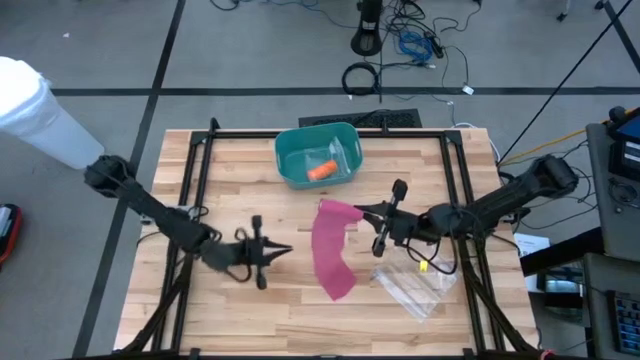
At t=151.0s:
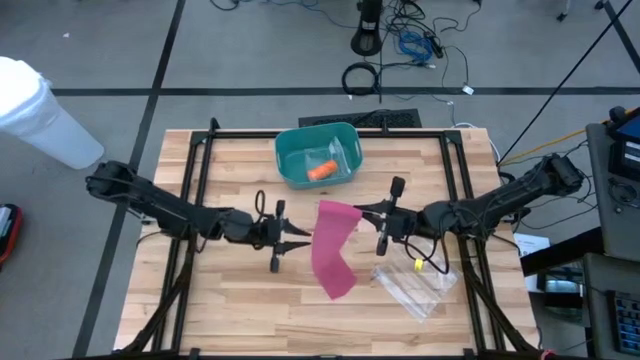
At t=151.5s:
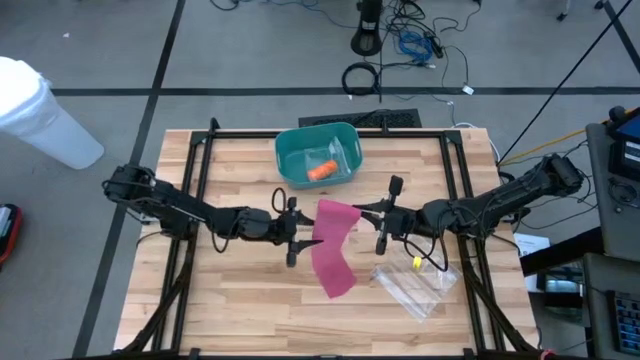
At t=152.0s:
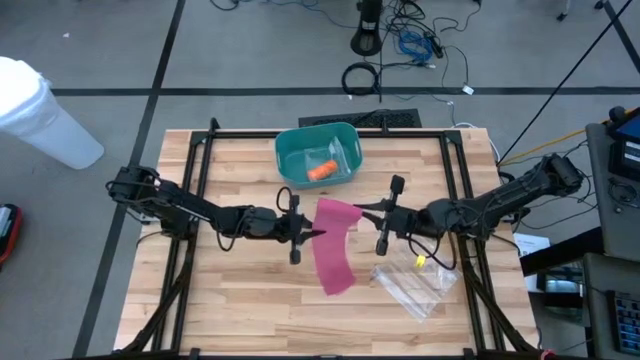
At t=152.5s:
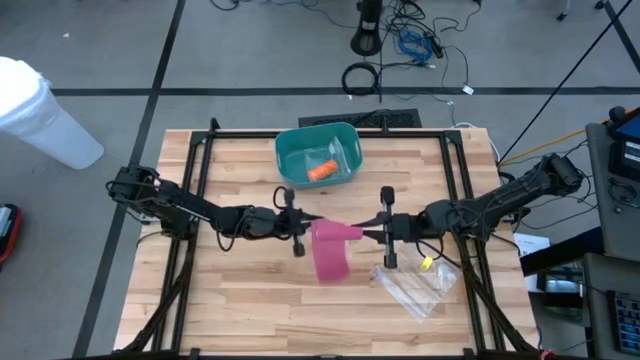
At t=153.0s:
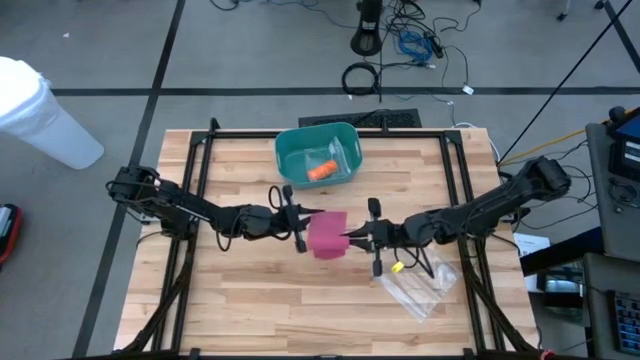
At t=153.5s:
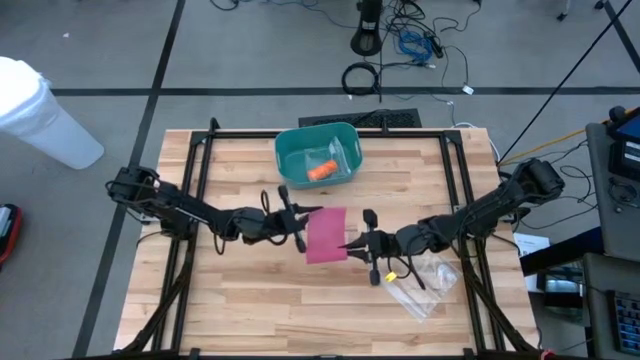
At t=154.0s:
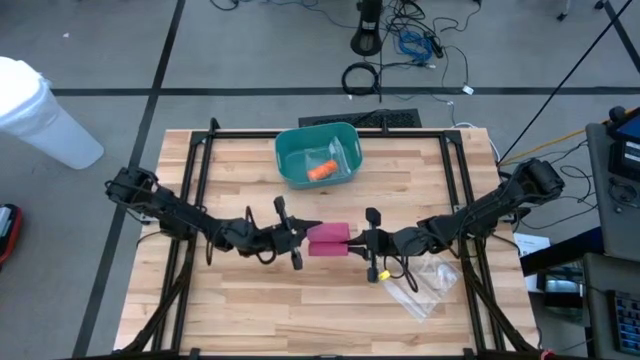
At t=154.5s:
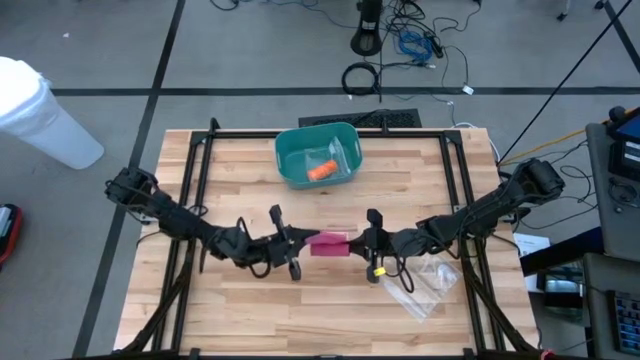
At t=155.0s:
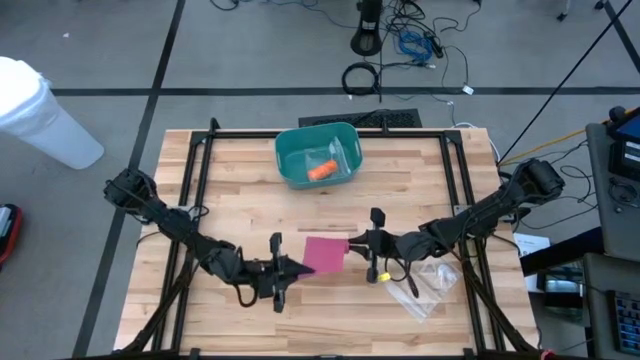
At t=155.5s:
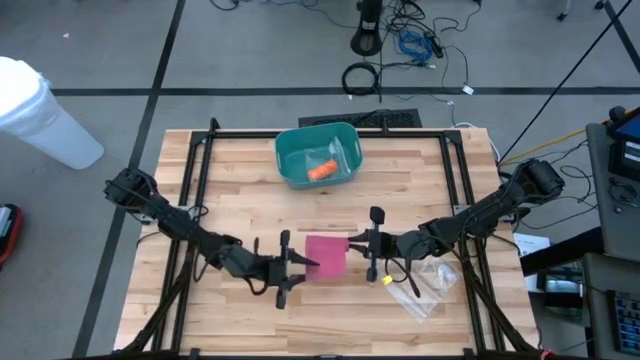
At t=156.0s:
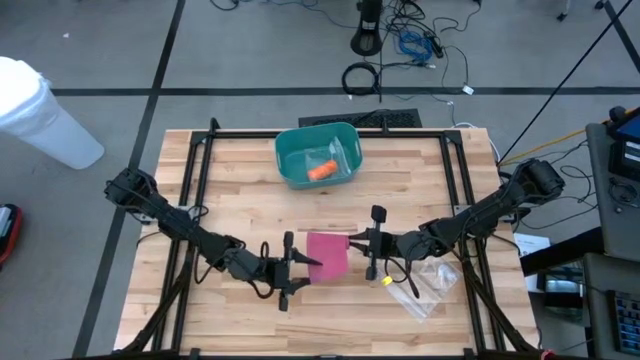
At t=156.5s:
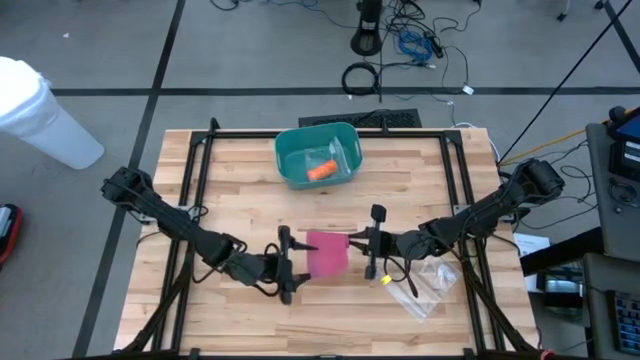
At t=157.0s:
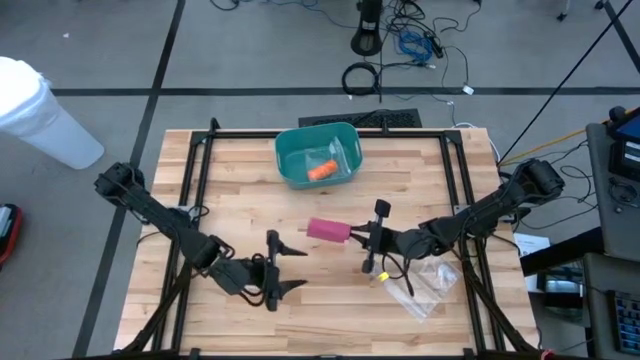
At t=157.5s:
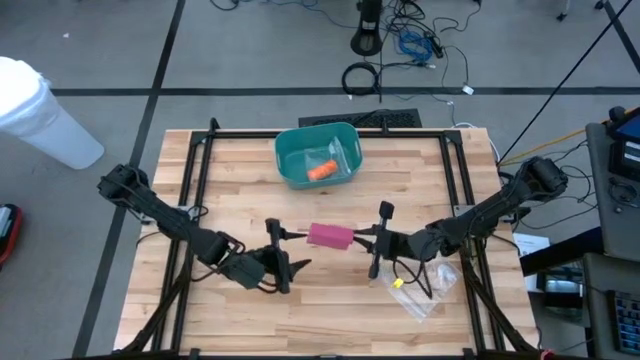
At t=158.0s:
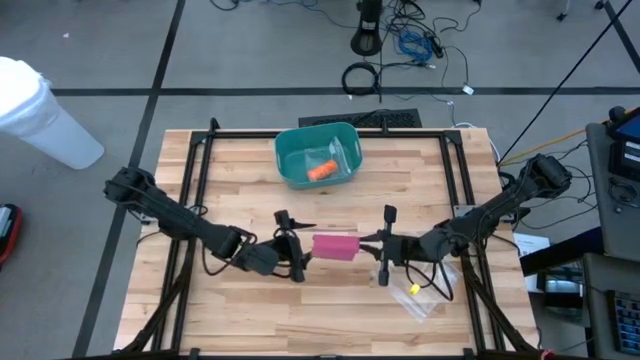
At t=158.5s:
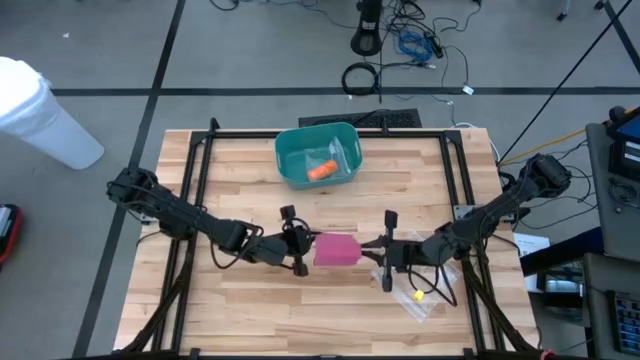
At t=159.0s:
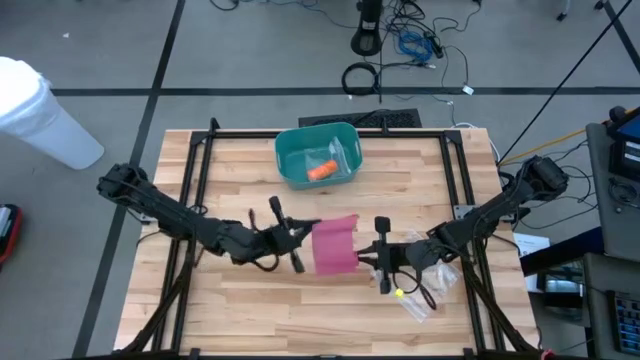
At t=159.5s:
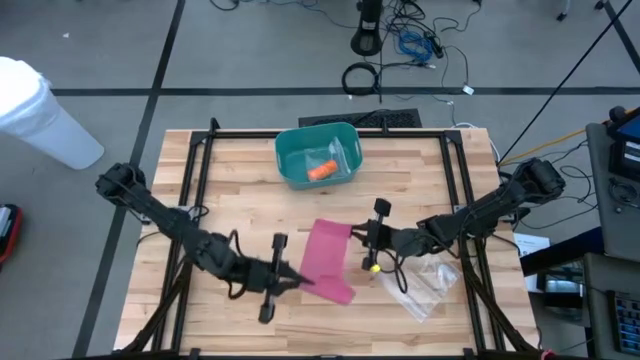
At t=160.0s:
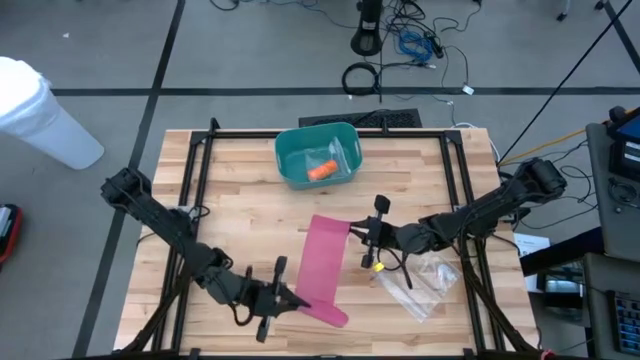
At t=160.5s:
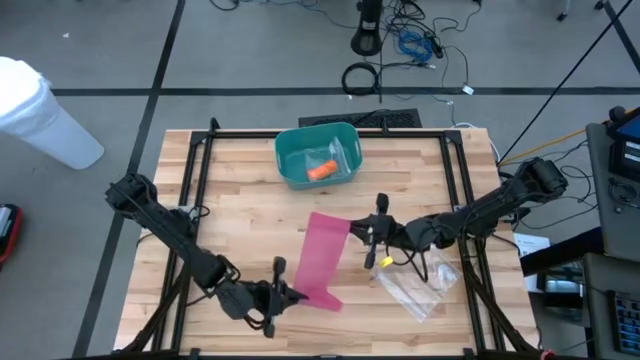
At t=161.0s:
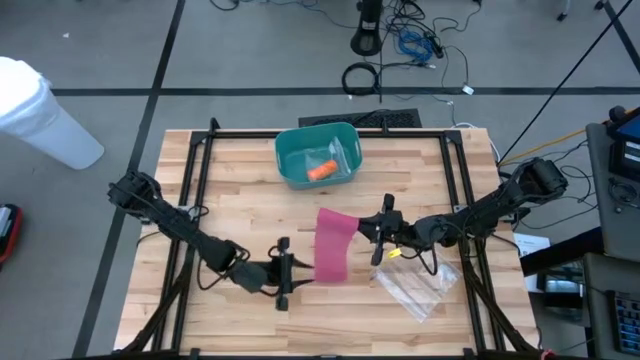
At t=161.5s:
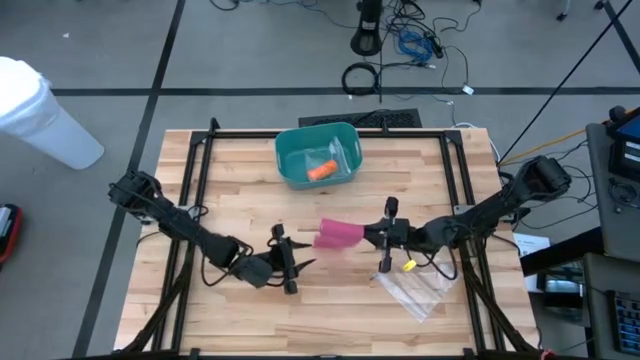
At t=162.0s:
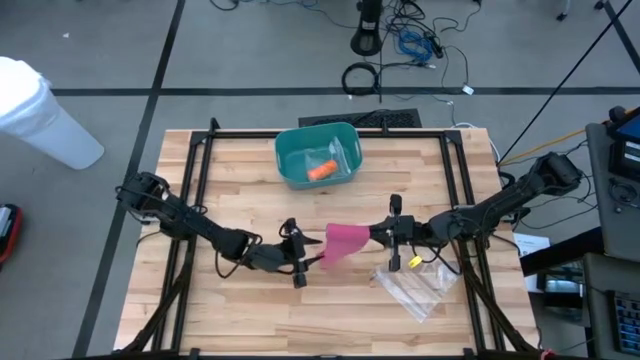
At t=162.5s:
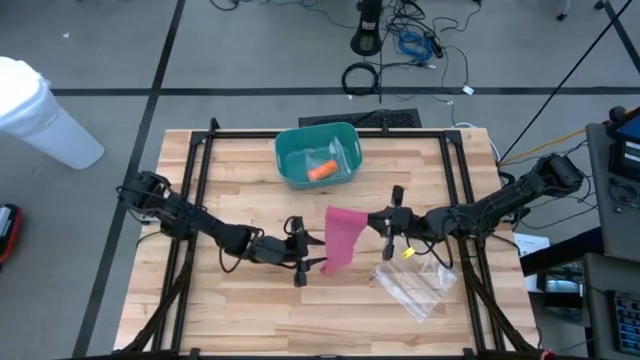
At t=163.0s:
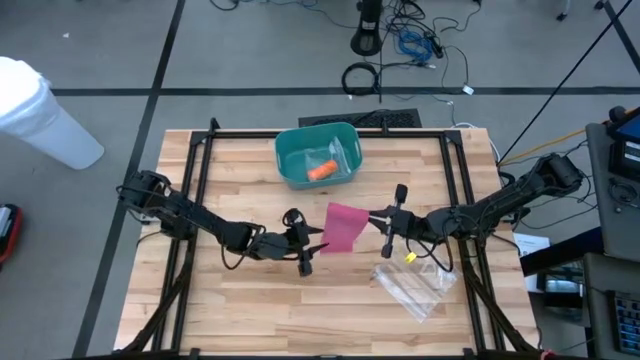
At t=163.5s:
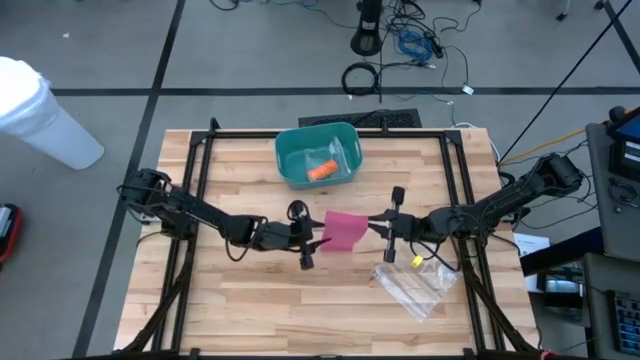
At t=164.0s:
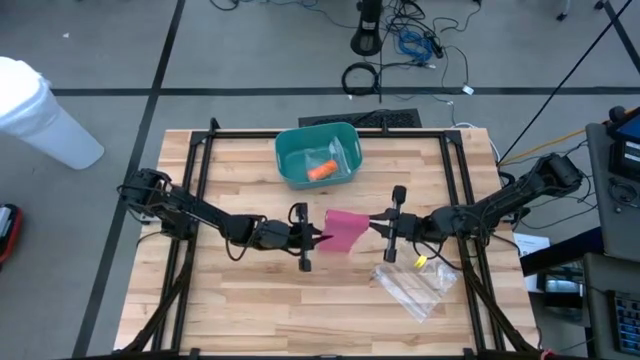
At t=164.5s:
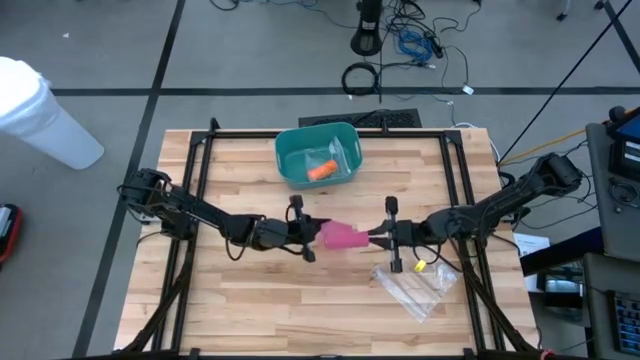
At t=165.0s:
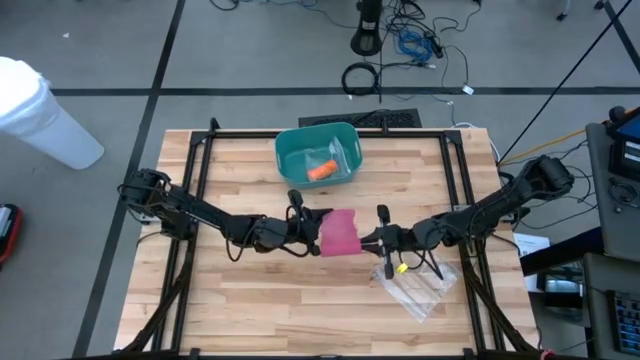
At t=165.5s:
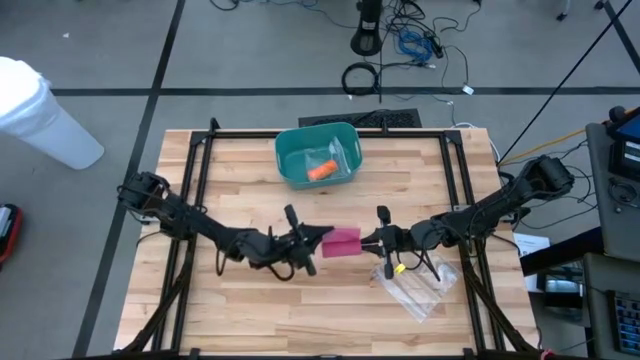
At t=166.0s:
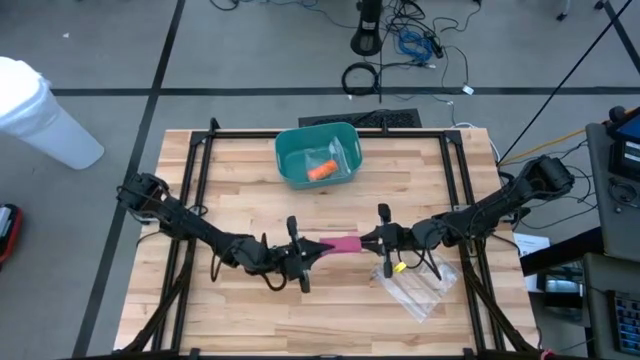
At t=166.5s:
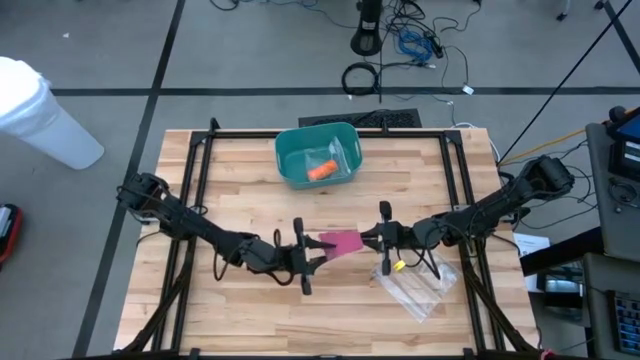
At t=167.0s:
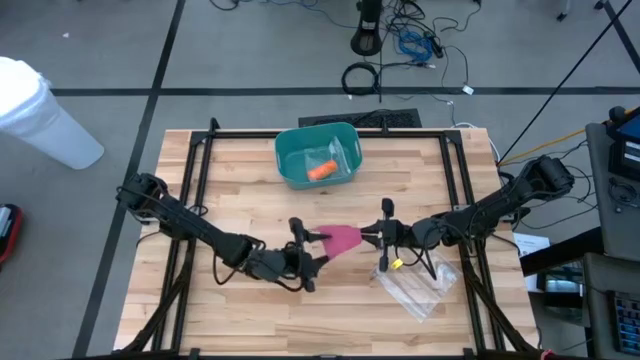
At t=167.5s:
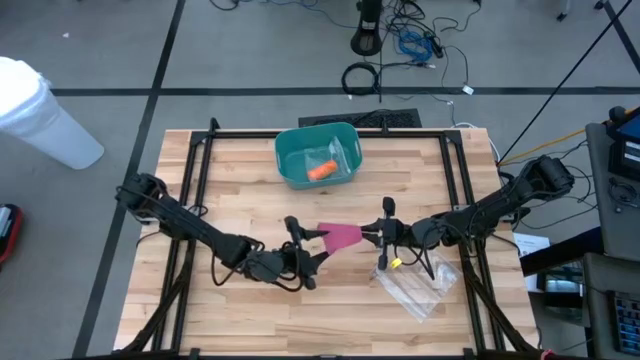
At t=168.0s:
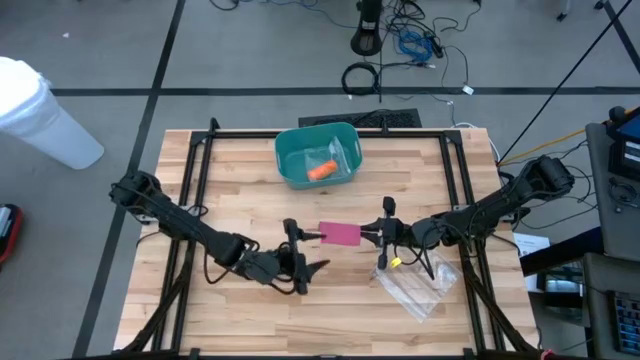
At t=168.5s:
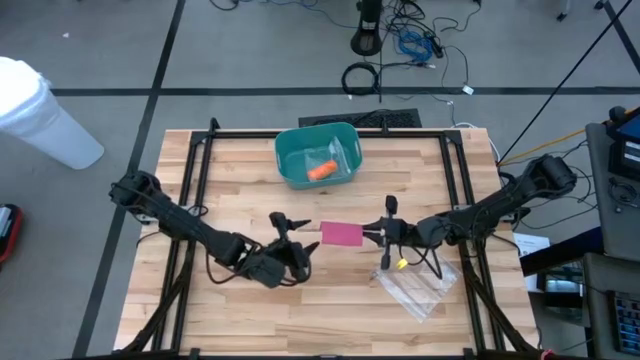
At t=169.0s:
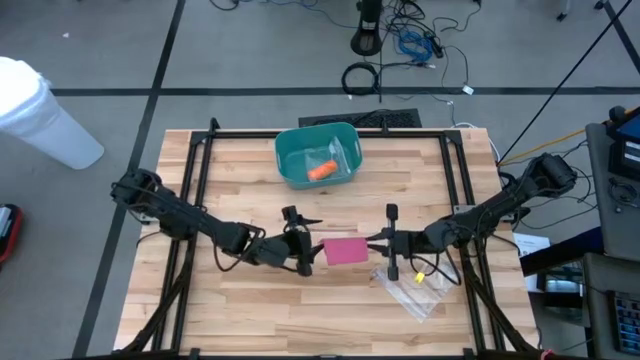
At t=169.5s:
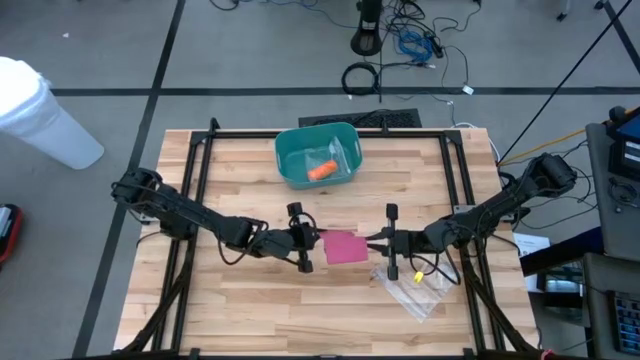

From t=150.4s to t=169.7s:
Task: Roll bandage
Roll the pink bandage
